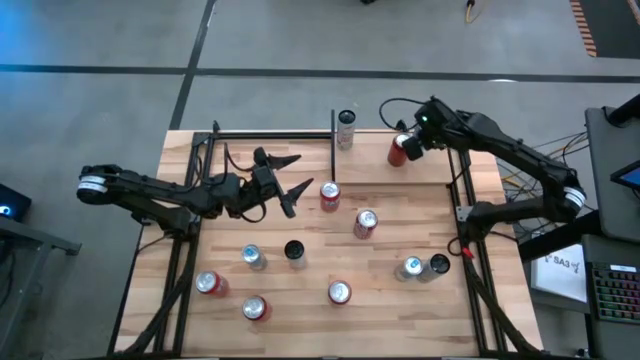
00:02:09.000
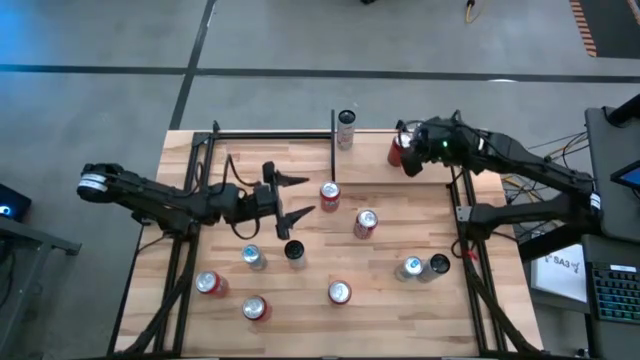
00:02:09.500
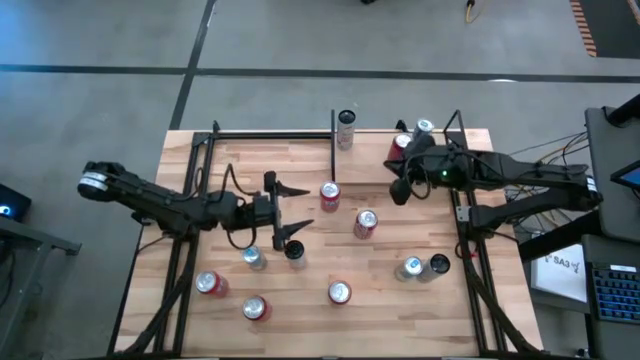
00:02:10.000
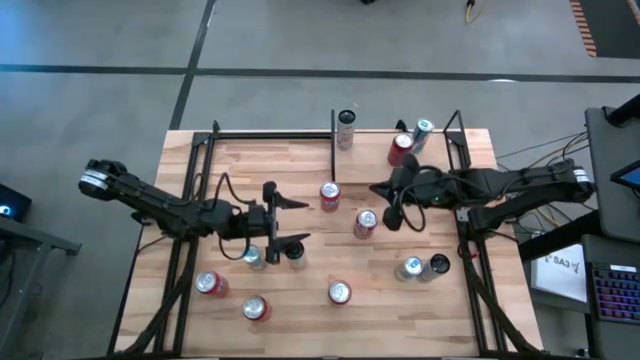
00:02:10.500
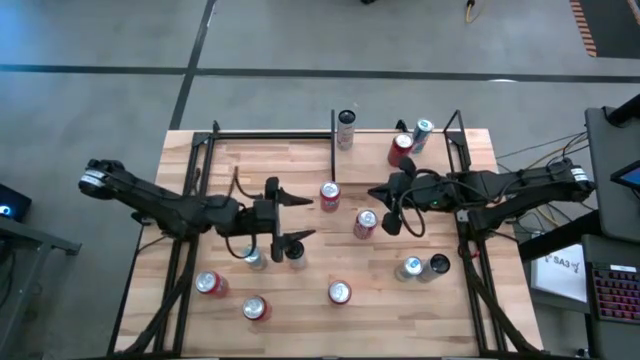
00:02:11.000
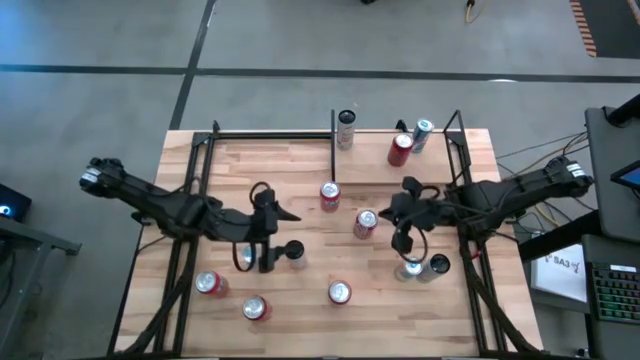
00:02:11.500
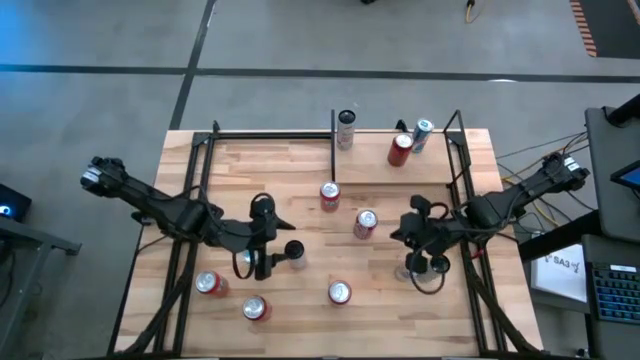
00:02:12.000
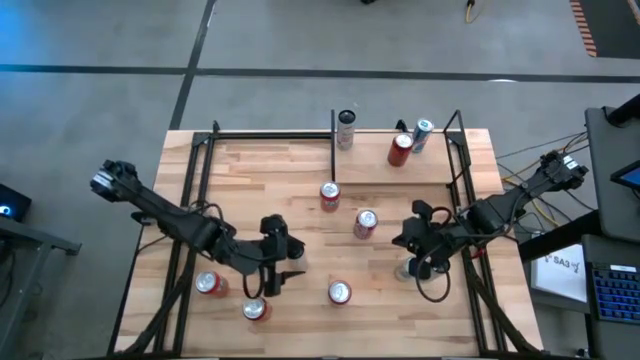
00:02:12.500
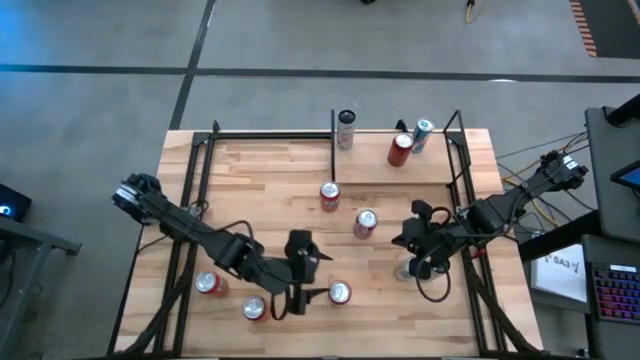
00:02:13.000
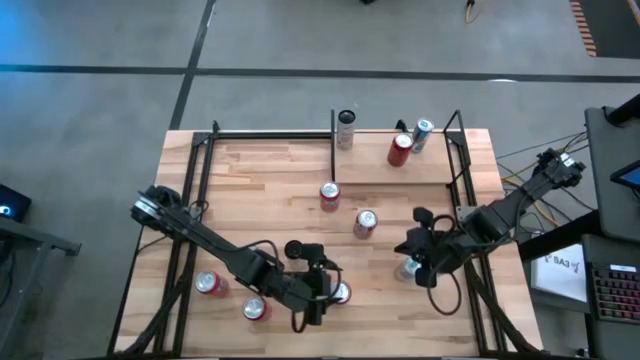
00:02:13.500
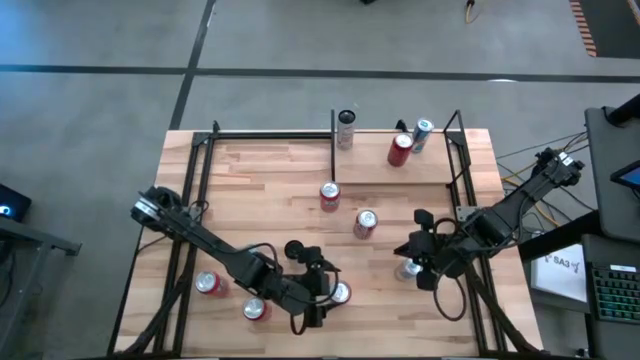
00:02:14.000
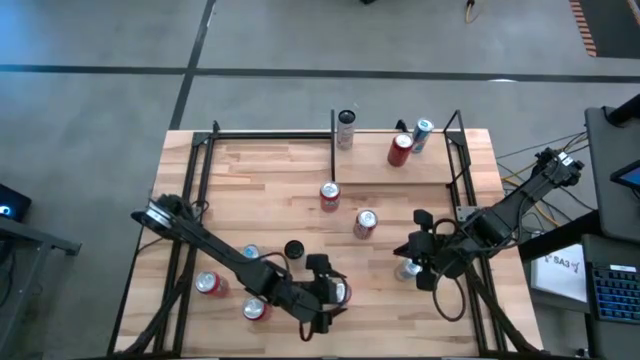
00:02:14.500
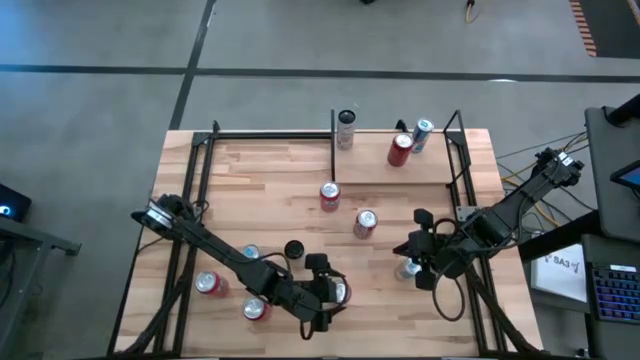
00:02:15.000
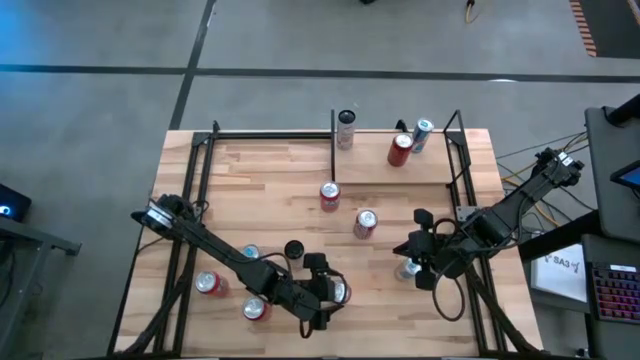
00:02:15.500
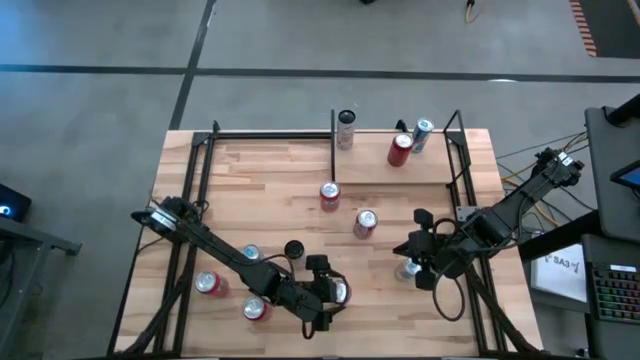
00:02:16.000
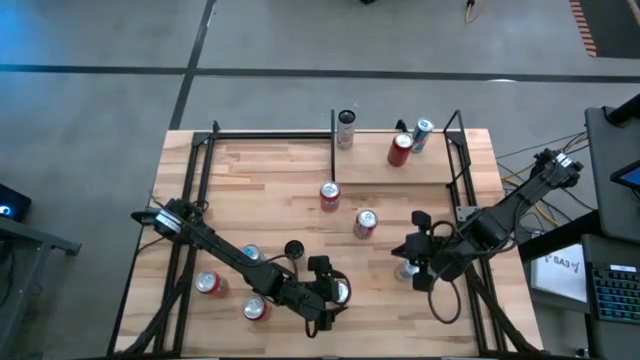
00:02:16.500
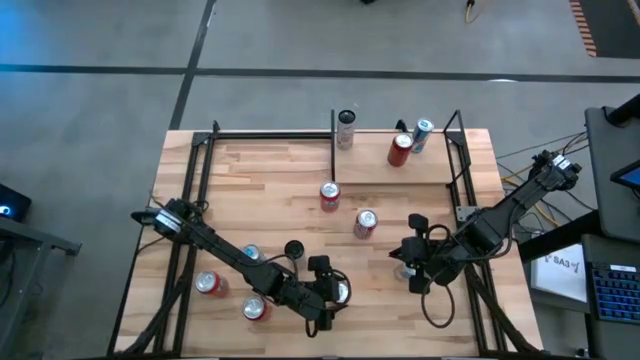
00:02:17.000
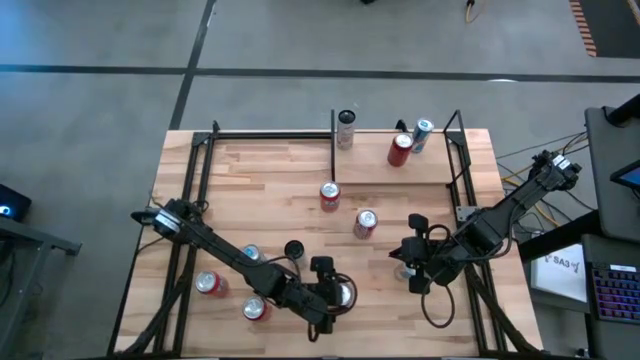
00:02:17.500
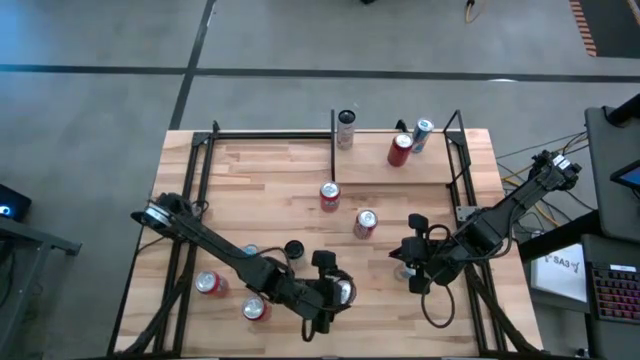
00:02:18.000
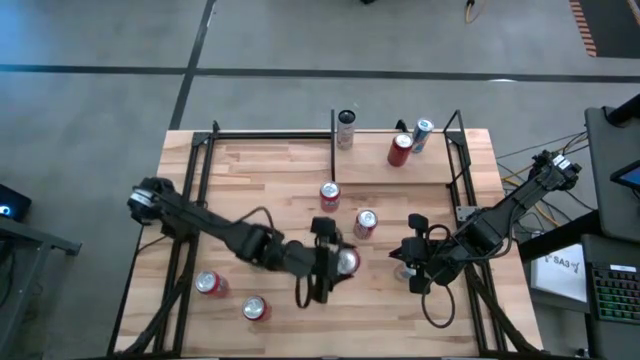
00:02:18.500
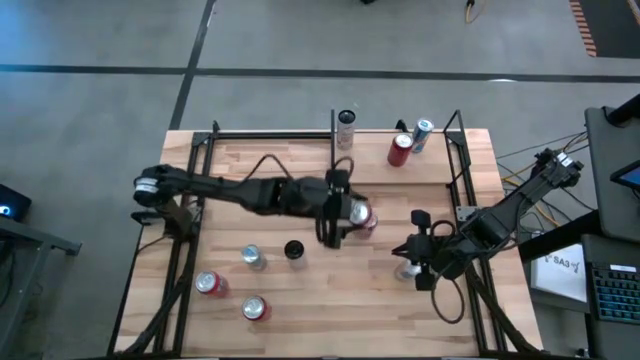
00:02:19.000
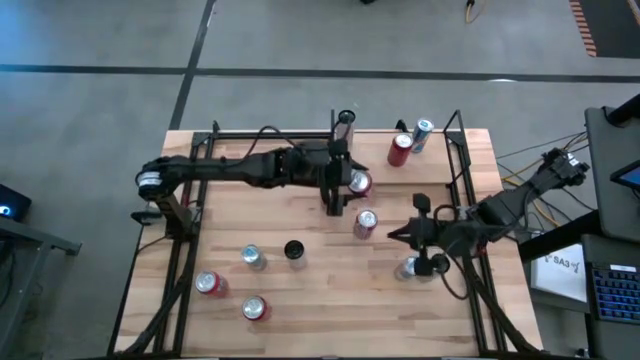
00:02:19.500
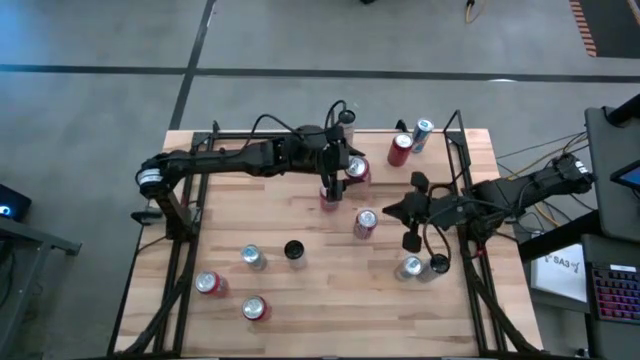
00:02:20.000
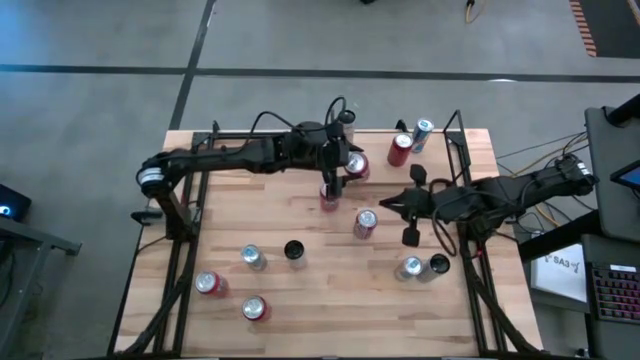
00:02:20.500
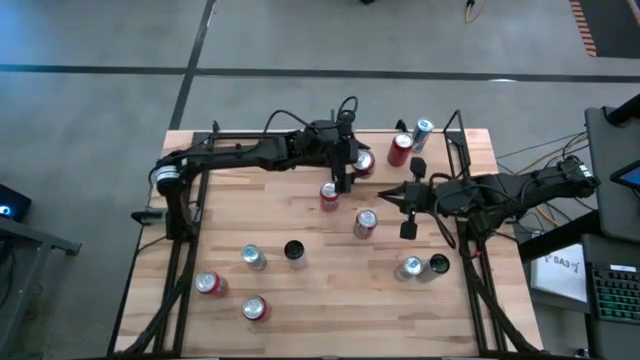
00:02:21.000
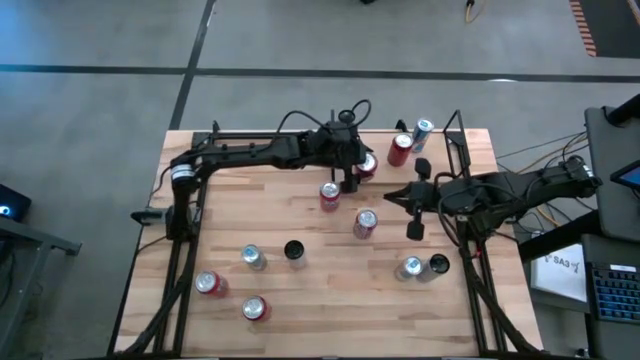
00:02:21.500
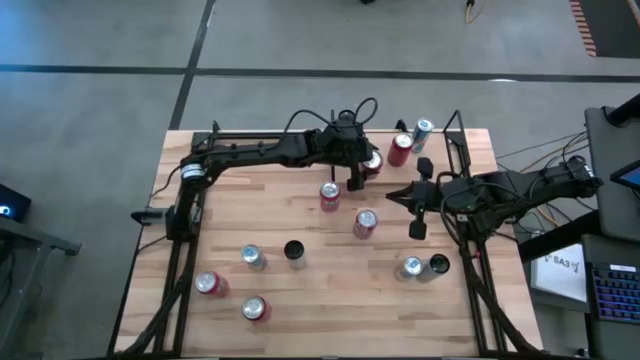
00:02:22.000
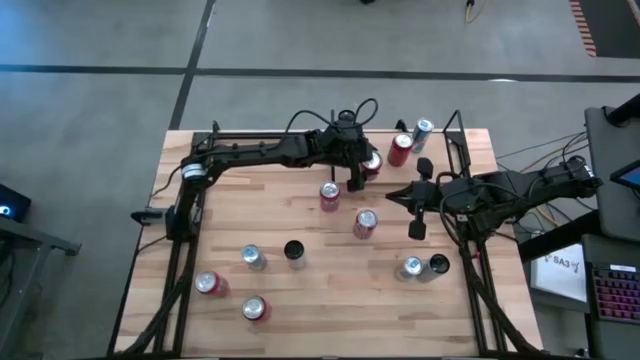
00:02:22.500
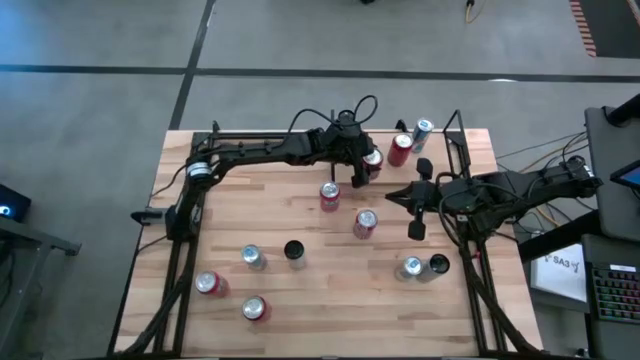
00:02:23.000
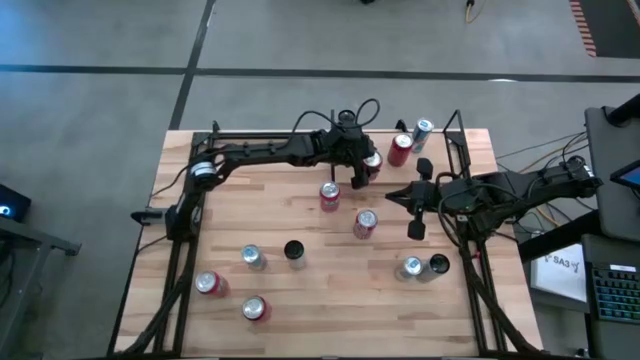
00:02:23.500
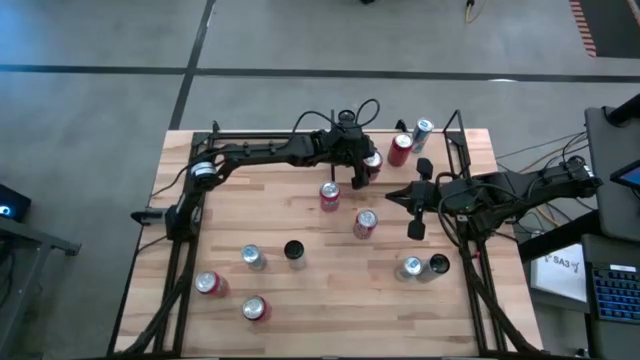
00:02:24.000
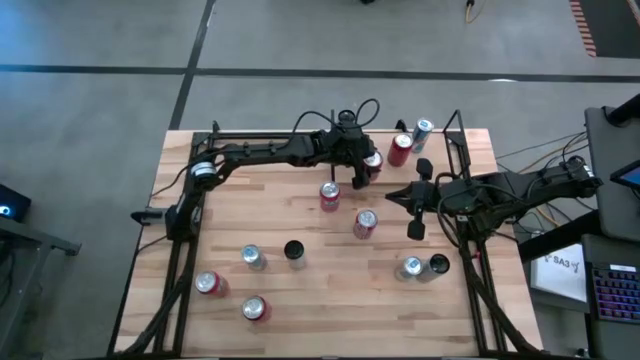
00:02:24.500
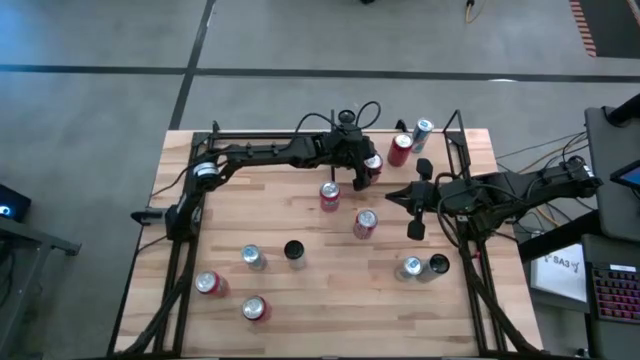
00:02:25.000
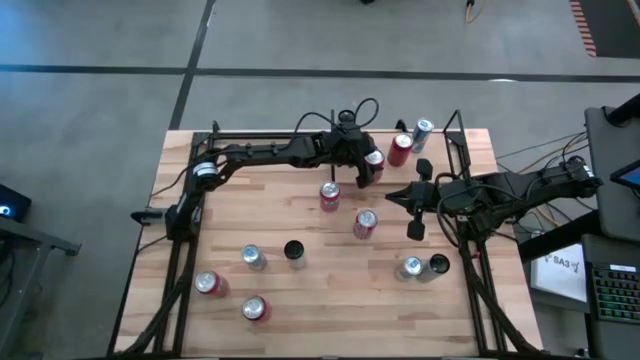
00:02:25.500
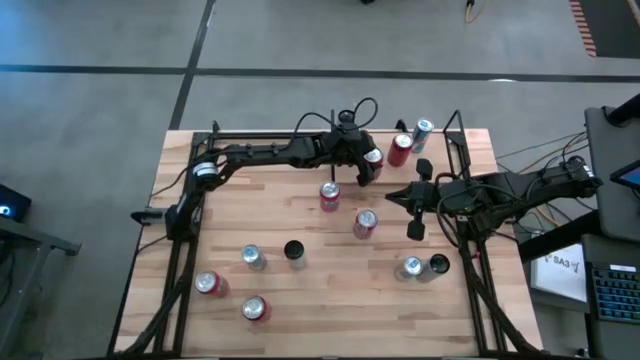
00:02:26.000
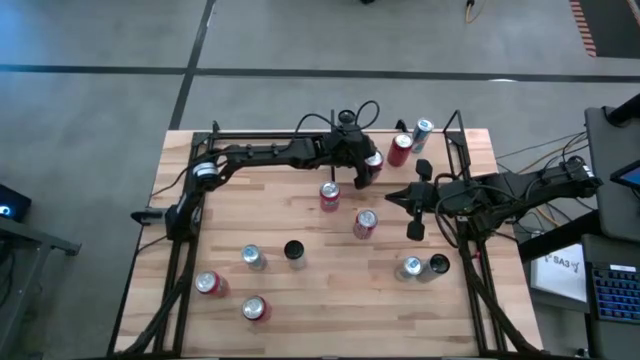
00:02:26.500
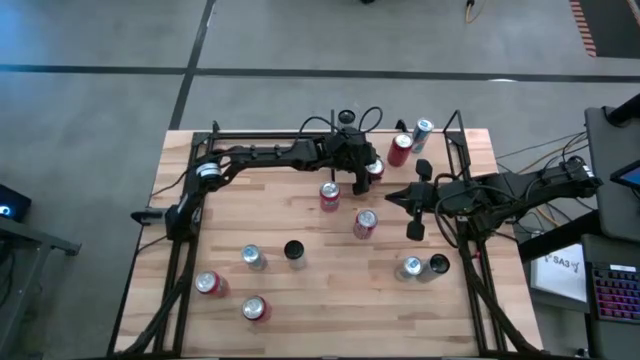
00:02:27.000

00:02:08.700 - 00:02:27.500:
Task: Place canned beverage on shelf
Put the bottom right orange soda can on the shelf

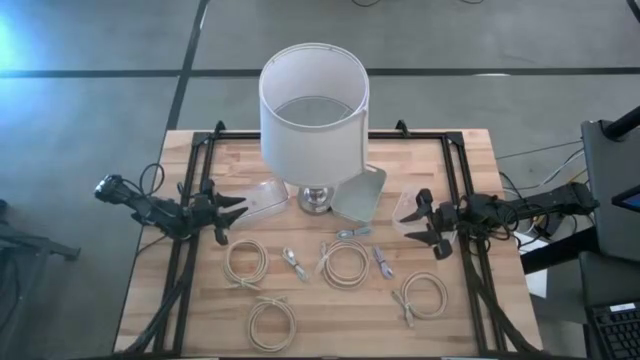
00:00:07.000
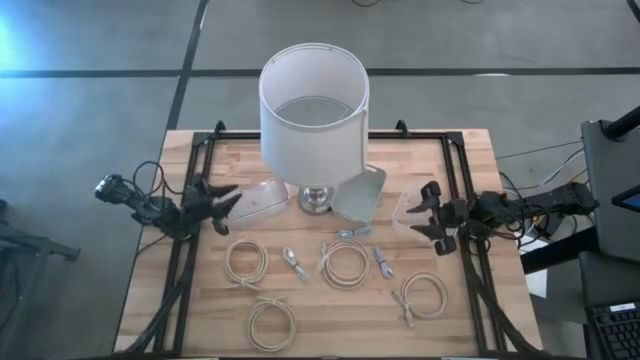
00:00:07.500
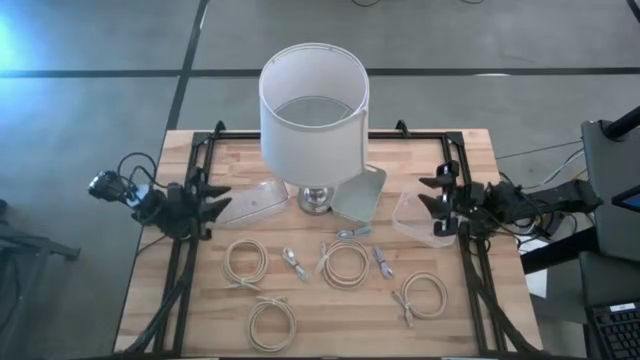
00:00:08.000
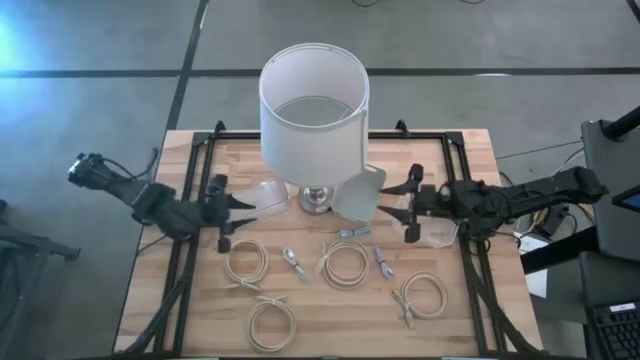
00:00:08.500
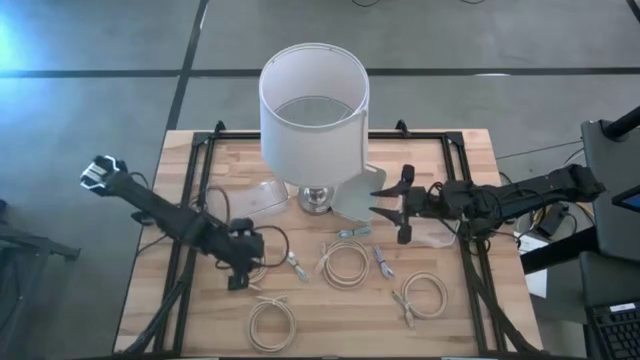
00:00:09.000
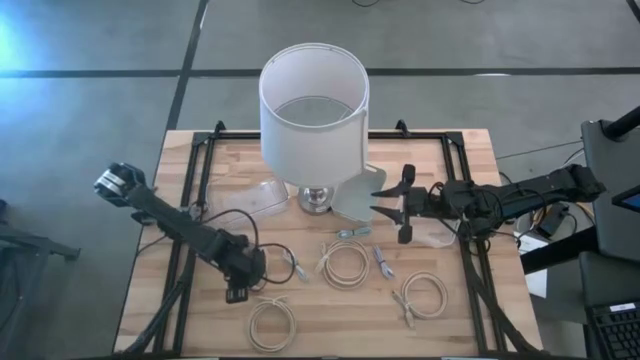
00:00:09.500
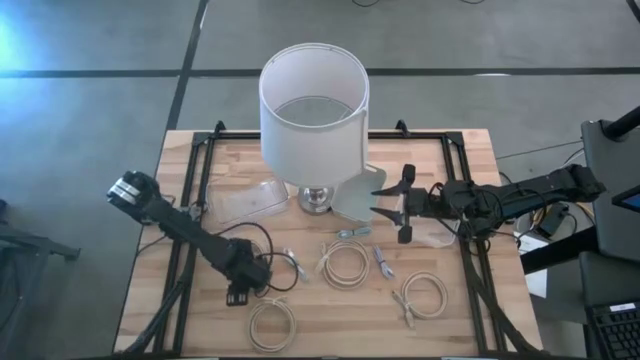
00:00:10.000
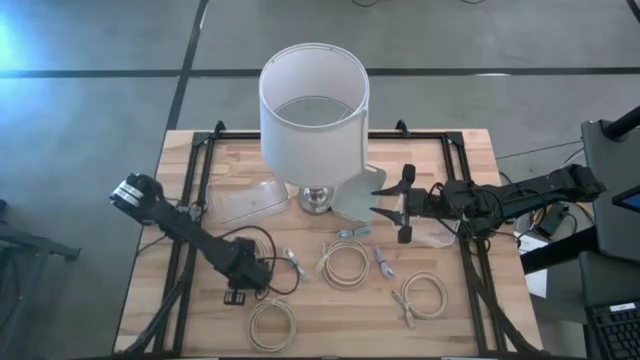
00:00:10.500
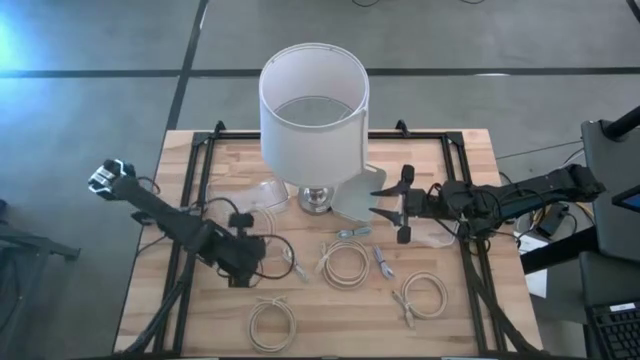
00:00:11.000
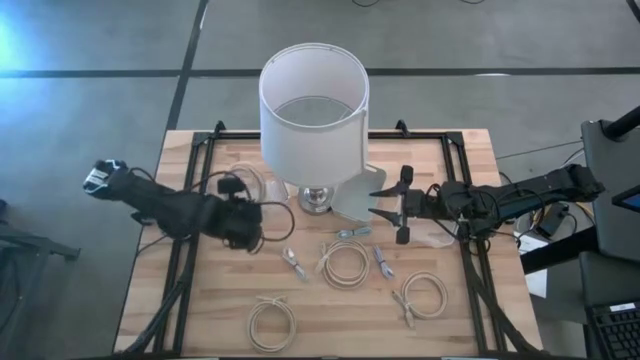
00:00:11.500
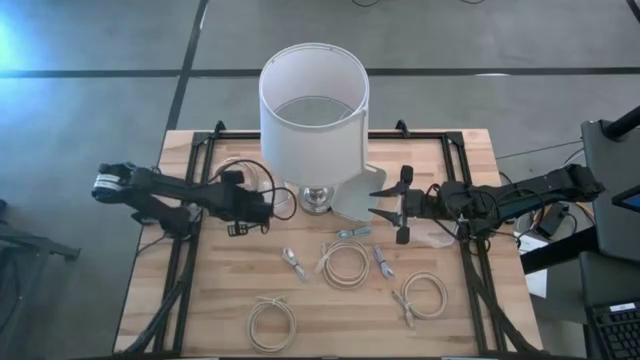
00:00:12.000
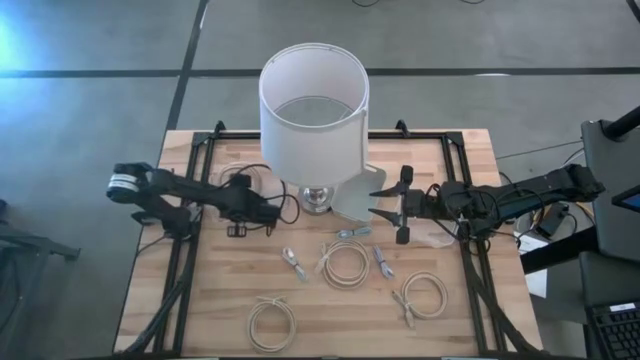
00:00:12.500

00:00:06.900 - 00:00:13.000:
Task: Pick & Place USB Port
Put the light brown HDMI cable into the left transparent bin
